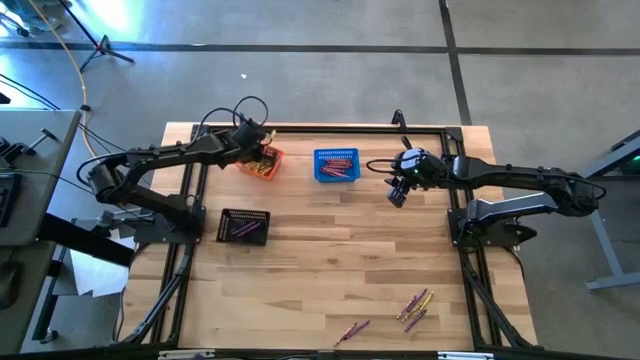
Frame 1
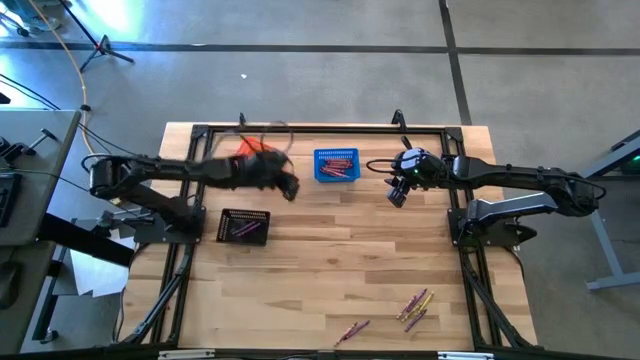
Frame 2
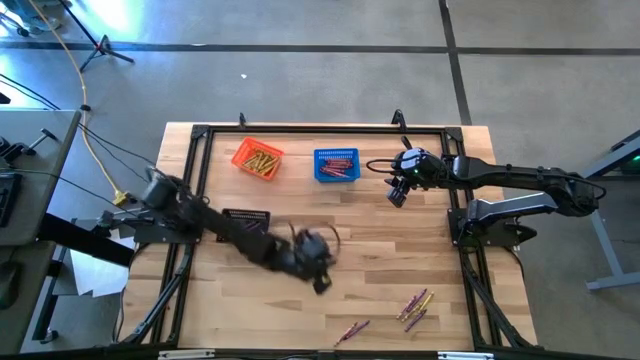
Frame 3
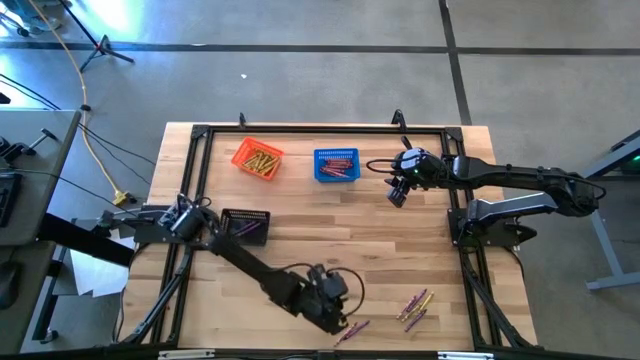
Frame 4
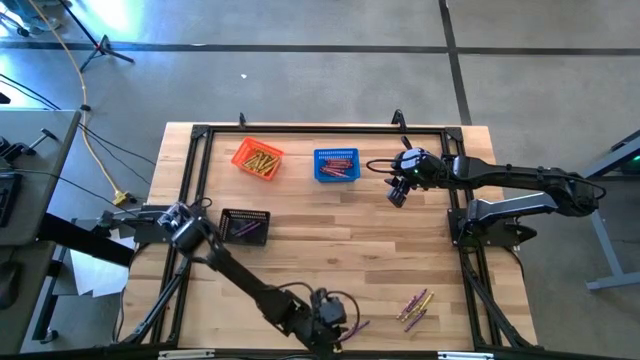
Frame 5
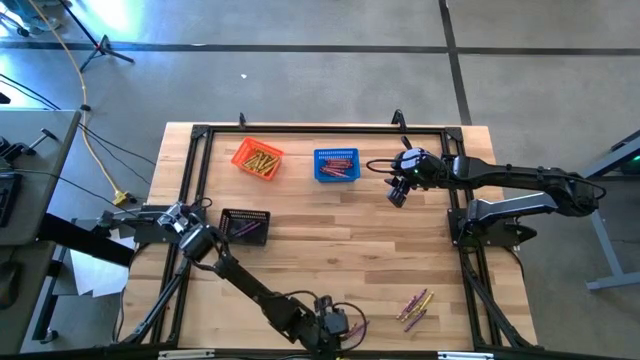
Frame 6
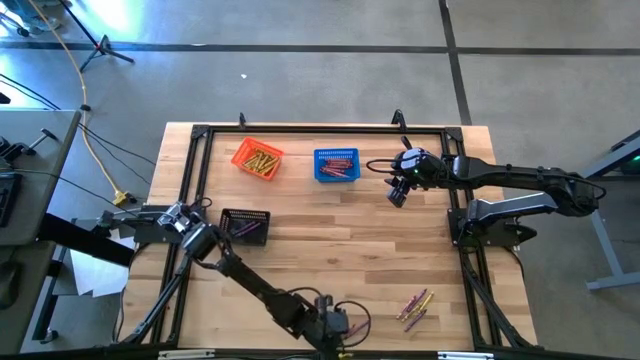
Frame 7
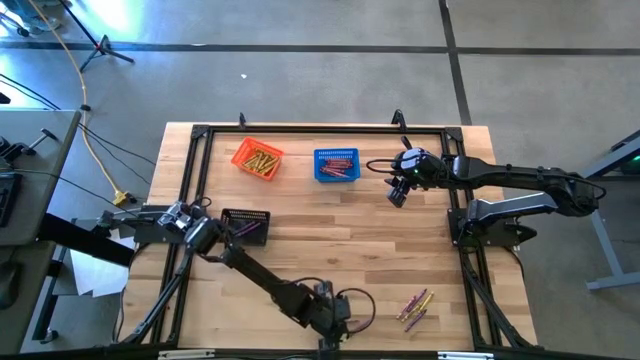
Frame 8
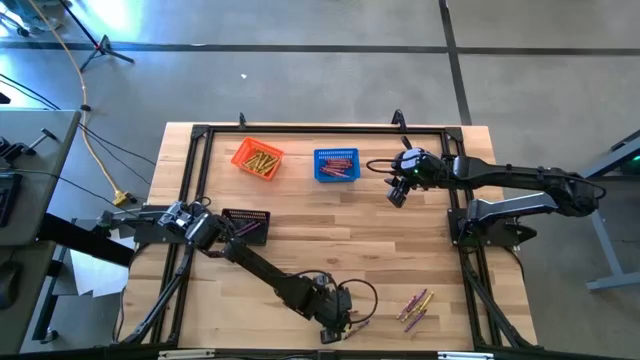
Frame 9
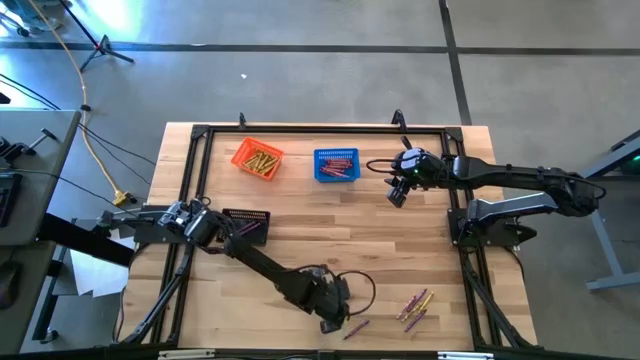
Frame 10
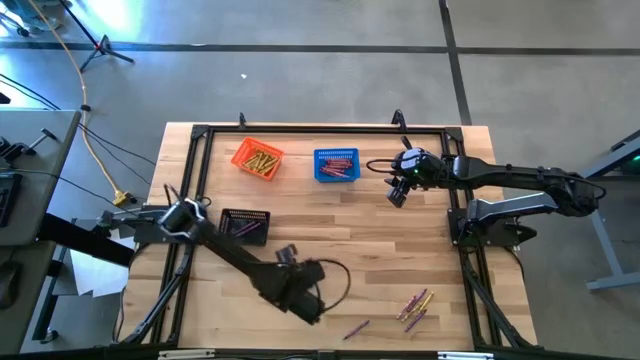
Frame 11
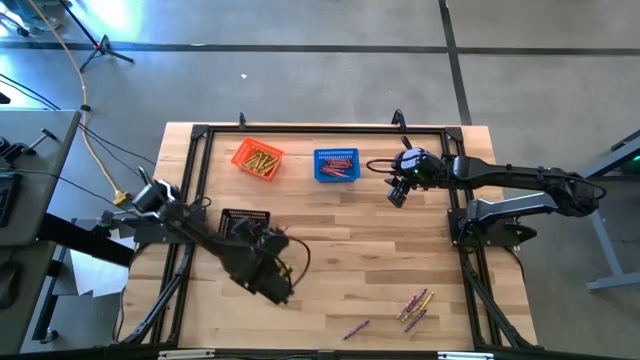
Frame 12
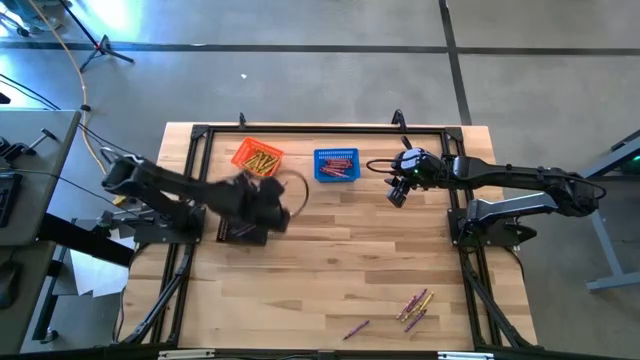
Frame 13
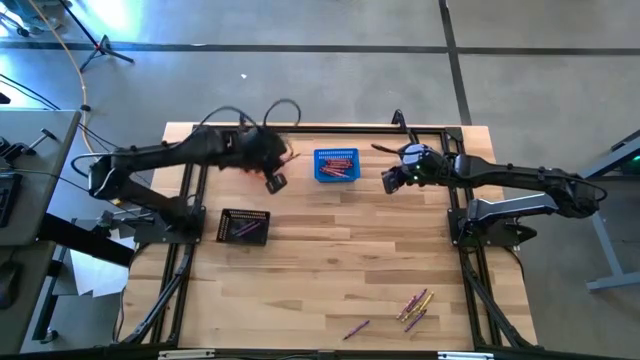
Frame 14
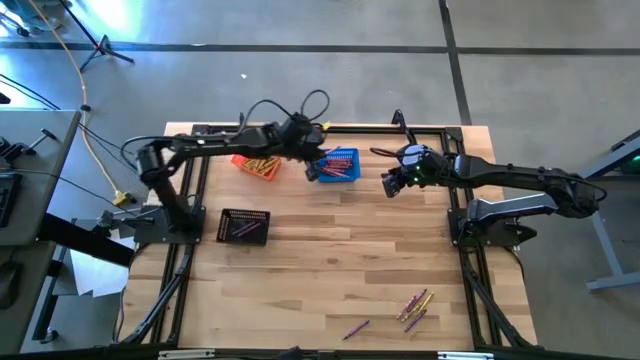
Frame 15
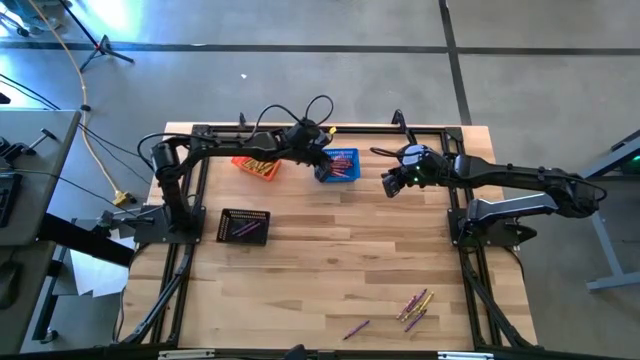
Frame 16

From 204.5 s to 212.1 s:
Task: Sort crayons
Put the red crayon into the blue bin

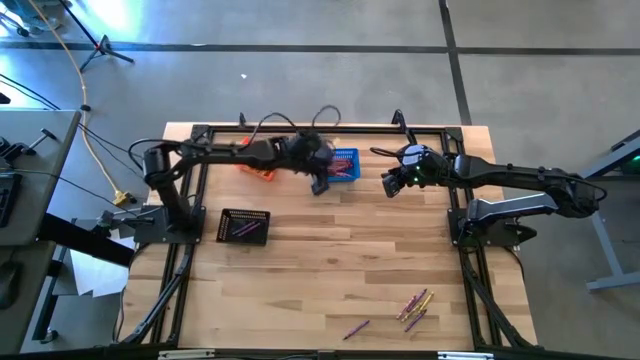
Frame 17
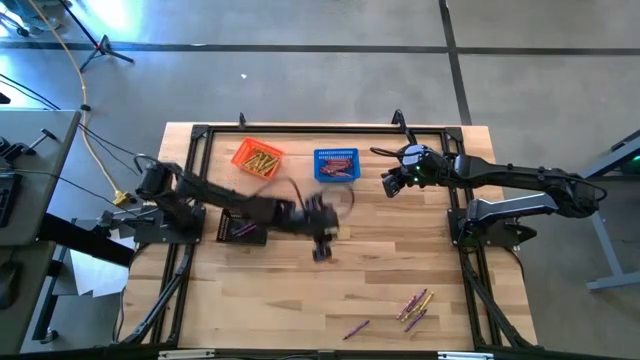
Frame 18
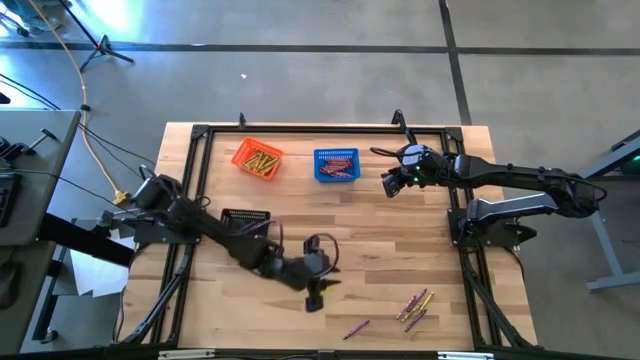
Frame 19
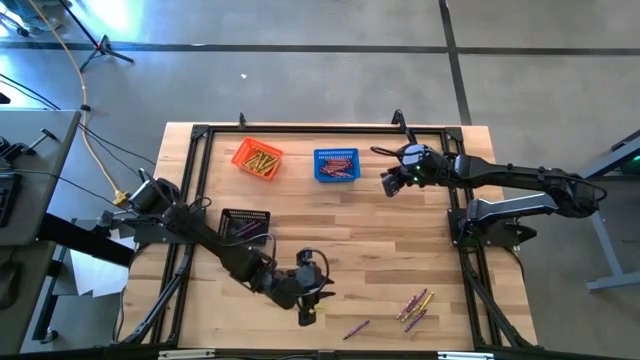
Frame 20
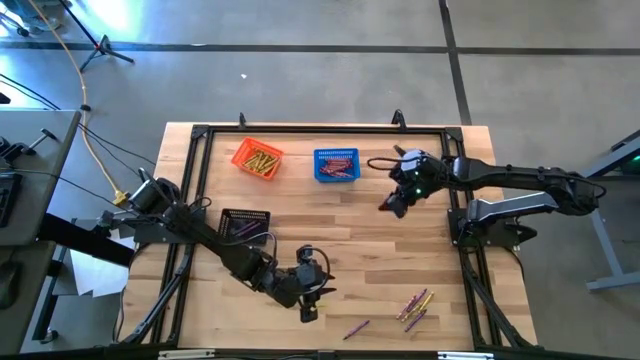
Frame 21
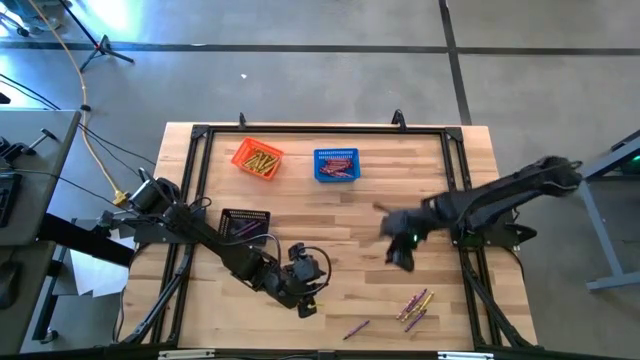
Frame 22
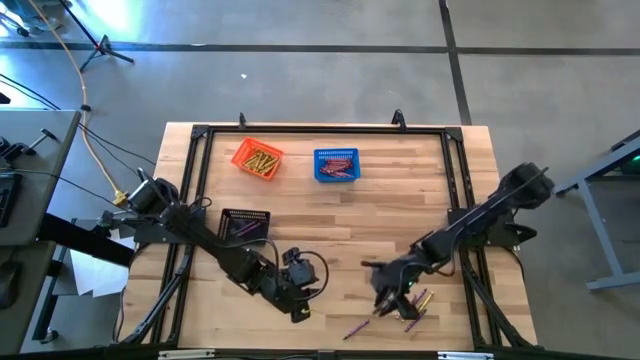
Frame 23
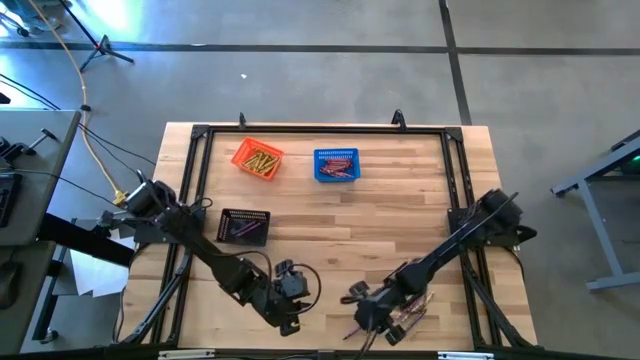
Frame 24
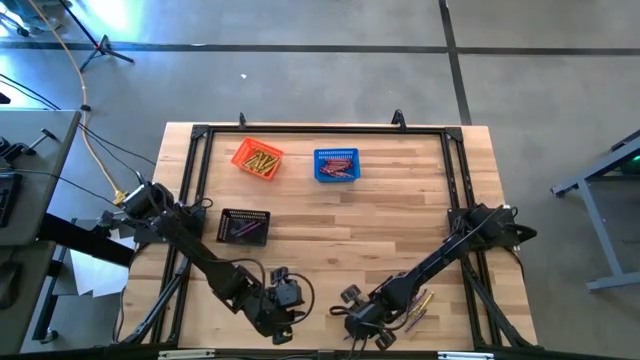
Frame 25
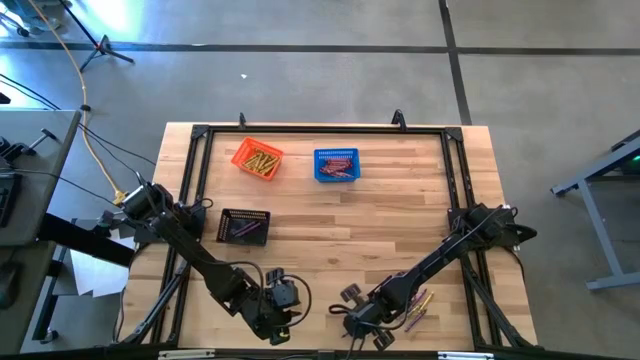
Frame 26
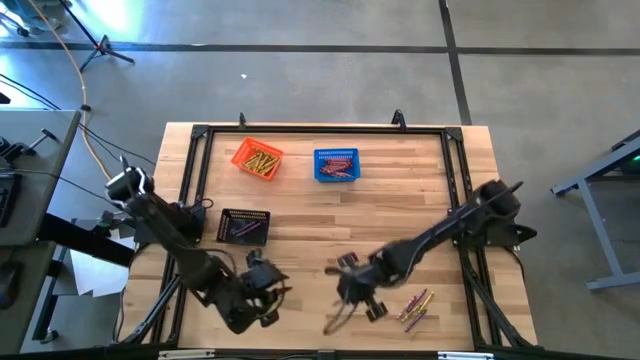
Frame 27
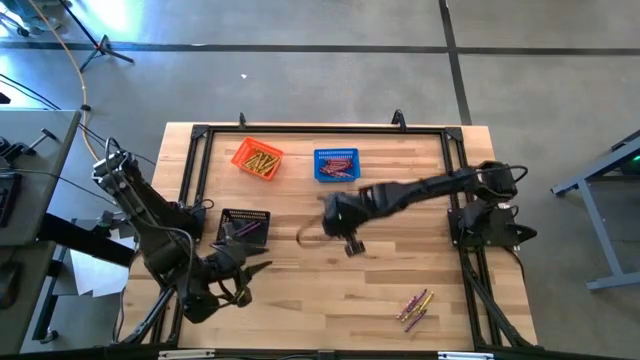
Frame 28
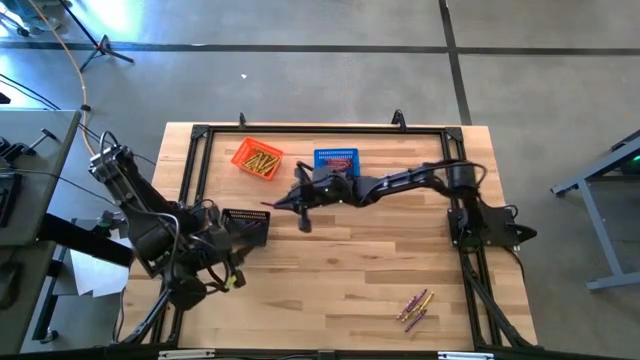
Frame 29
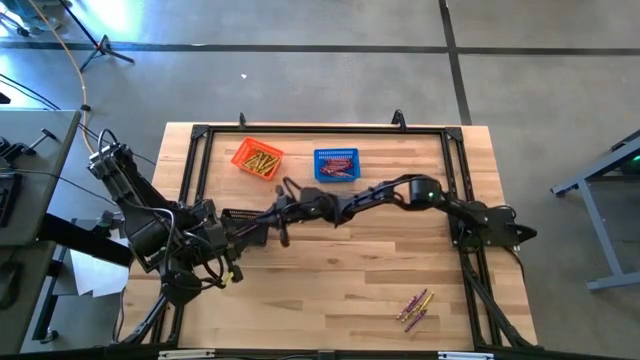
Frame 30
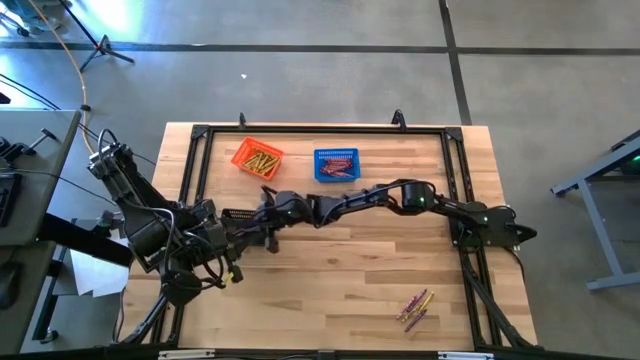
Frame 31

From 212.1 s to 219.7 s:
Put the violet crayon into the black bin

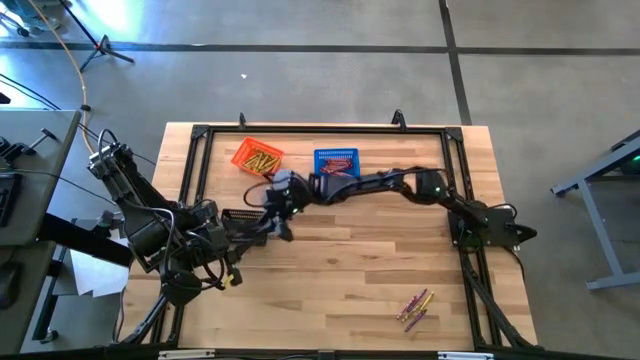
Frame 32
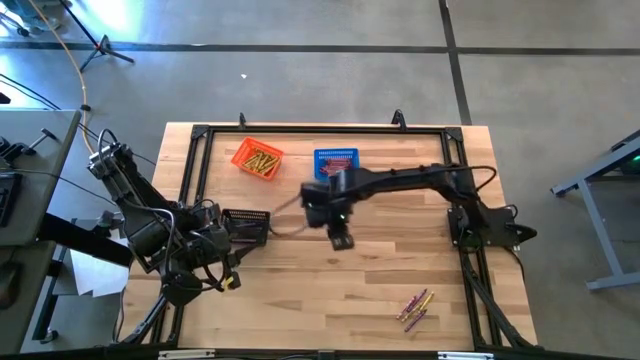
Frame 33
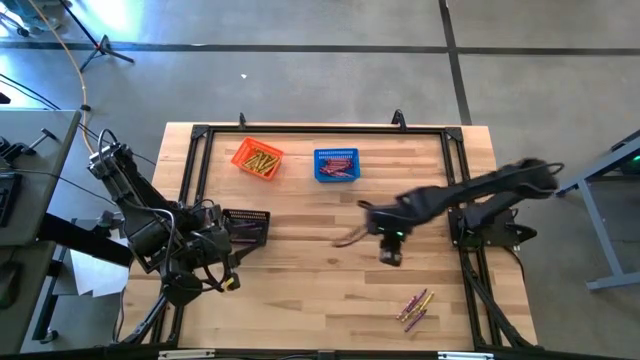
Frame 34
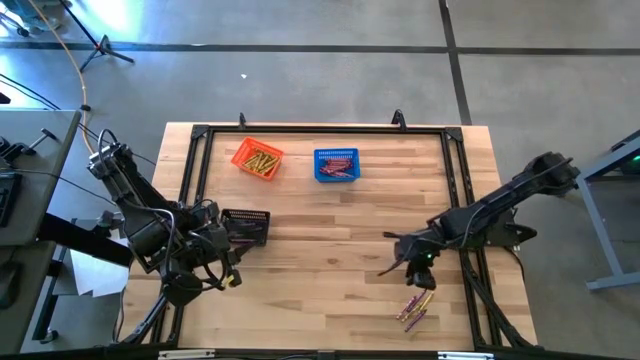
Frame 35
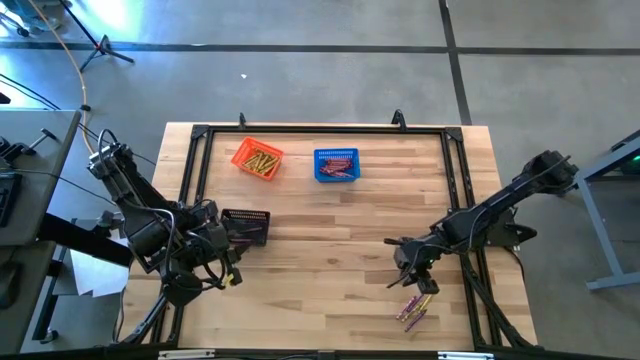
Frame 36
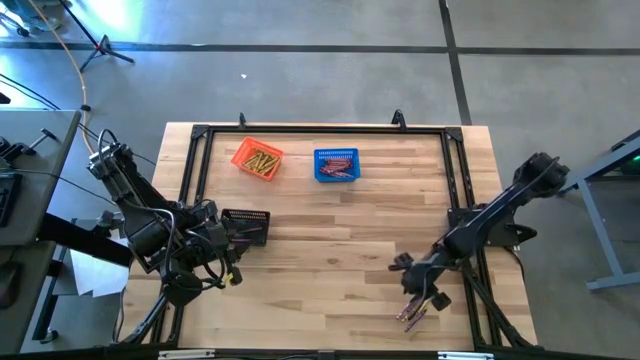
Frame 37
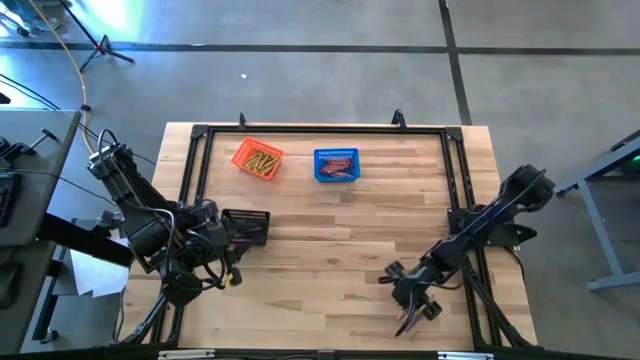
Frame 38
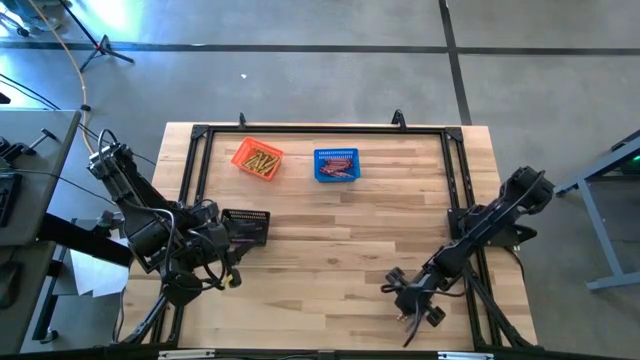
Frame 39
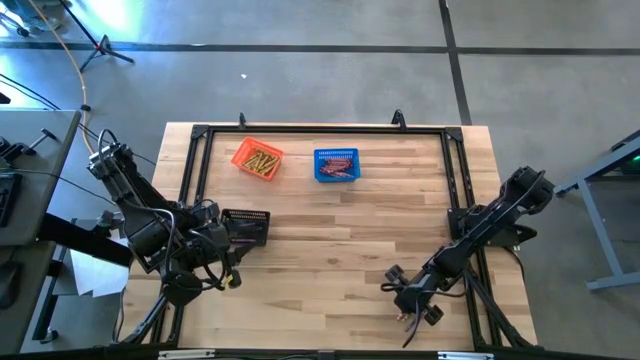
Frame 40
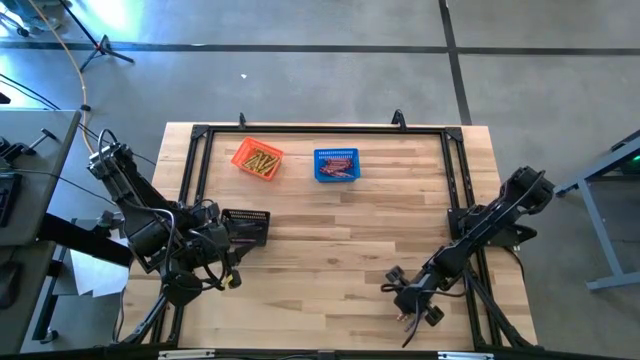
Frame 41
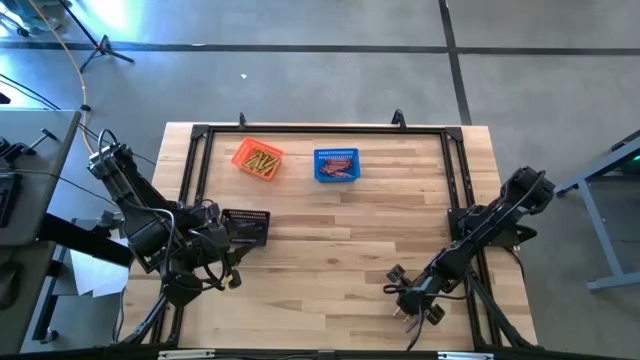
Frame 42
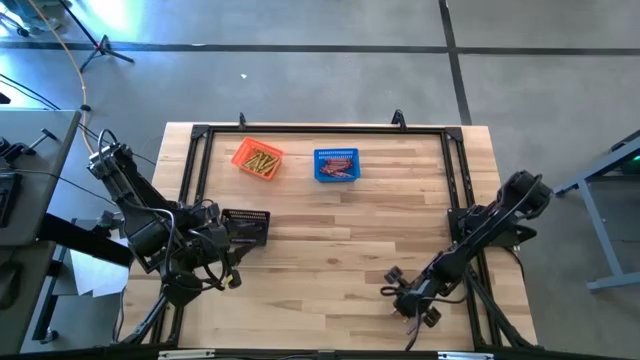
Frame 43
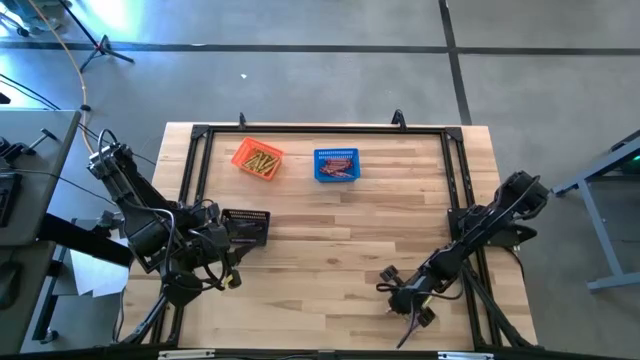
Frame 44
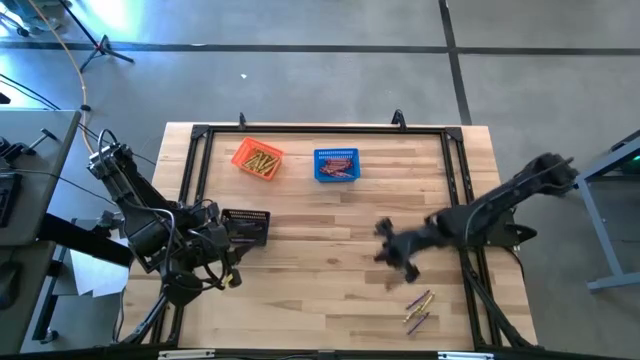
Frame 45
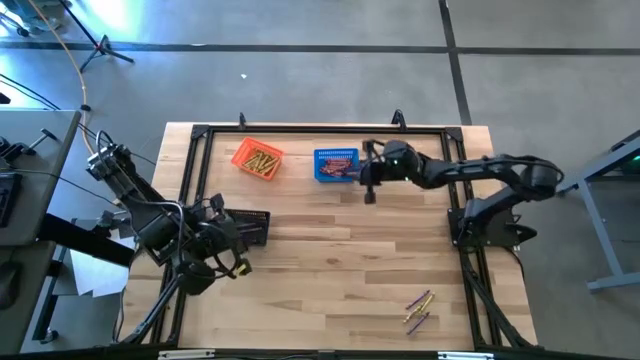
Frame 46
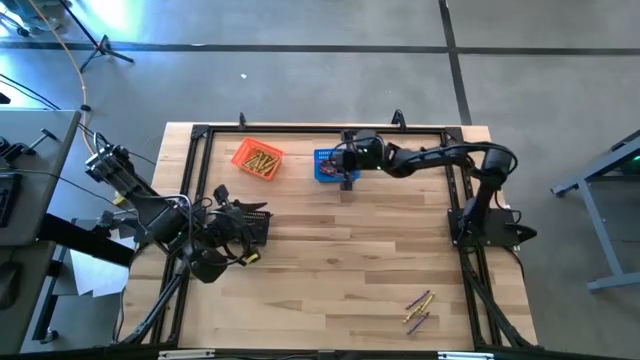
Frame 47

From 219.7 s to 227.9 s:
Put the red crayon into the blue bin
